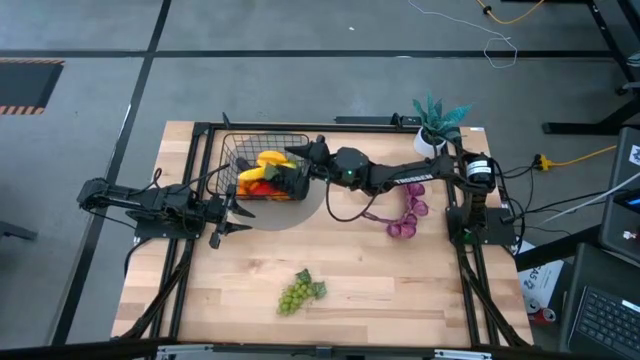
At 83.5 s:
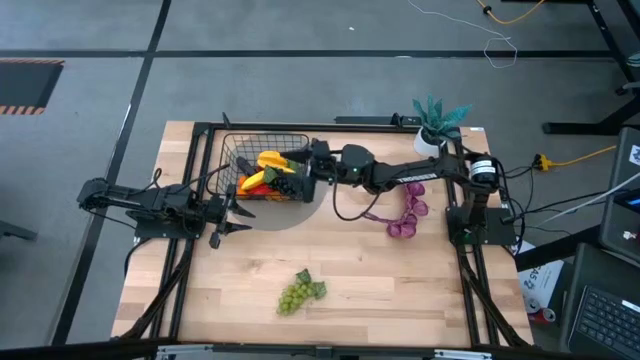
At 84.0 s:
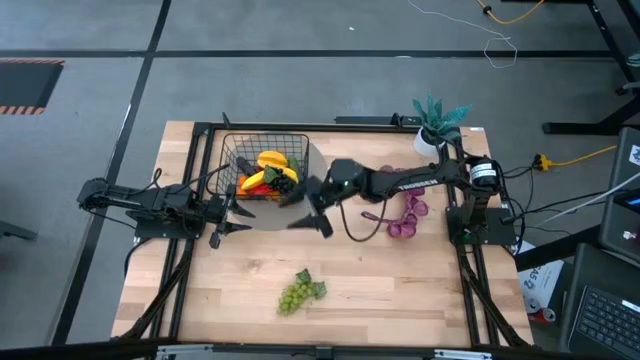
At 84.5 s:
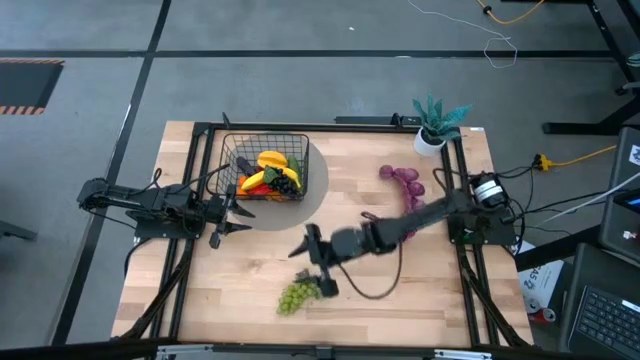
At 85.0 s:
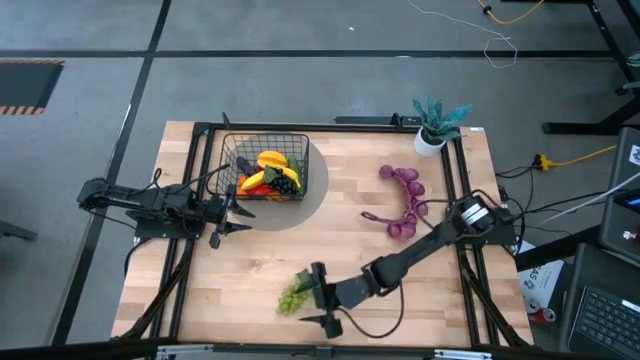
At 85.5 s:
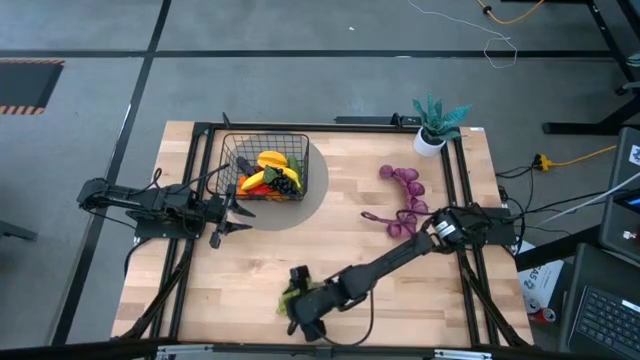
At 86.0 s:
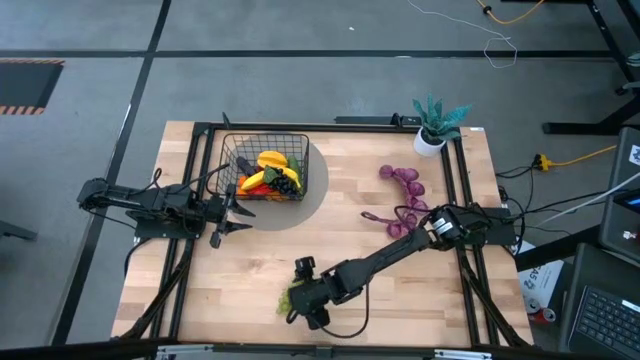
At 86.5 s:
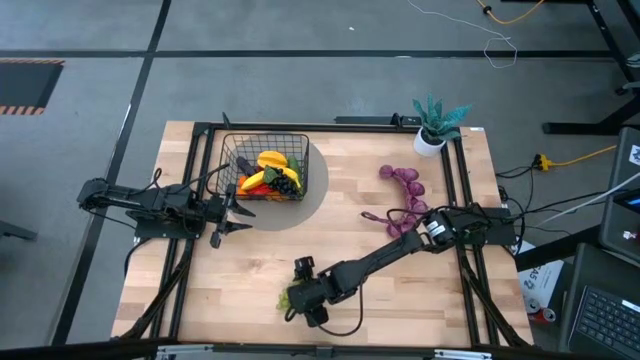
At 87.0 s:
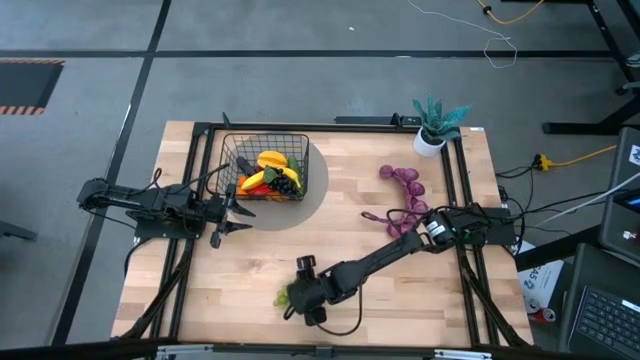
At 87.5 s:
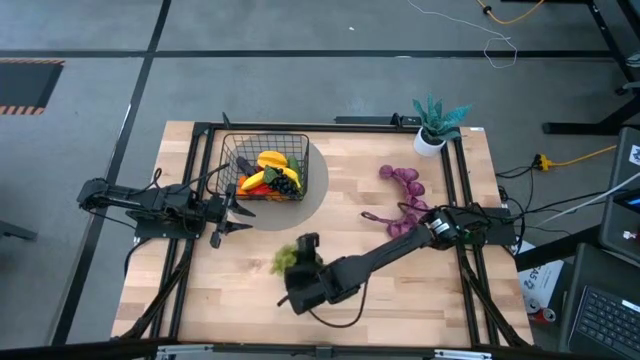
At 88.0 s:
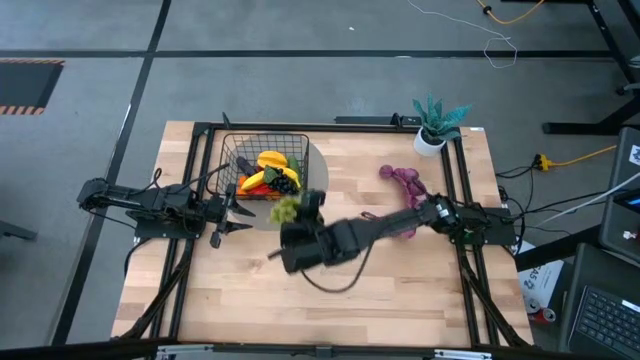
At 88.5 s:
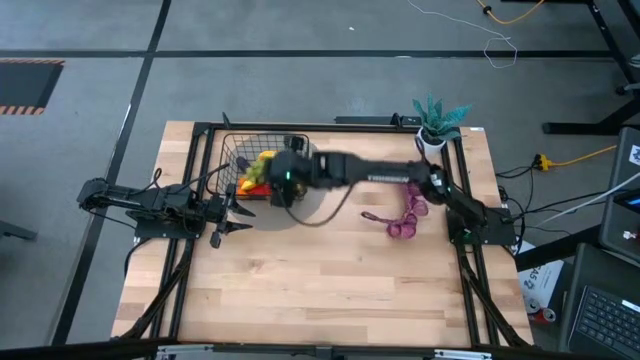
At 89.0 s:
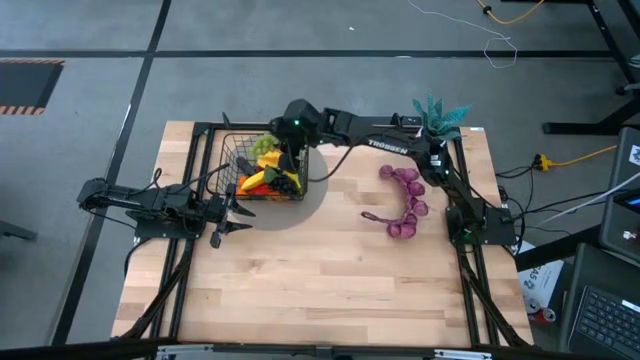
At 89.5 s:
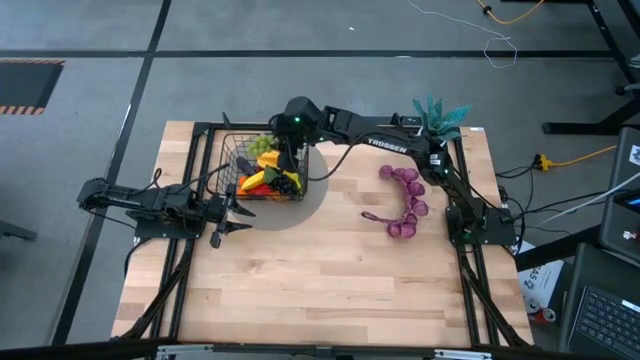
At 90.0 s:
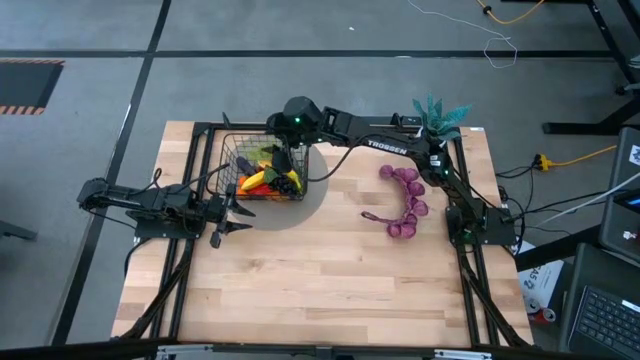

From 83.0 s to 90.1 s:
Task: Build produce basket
Put the green grapes into the wire basket

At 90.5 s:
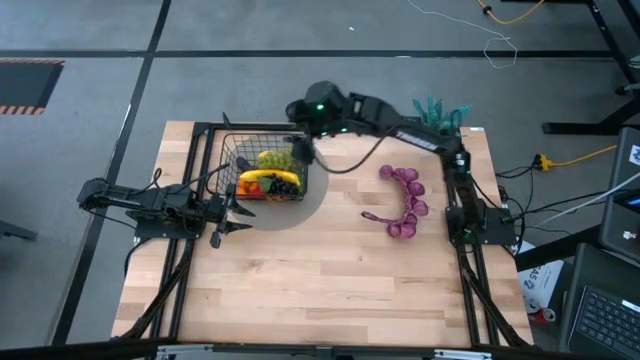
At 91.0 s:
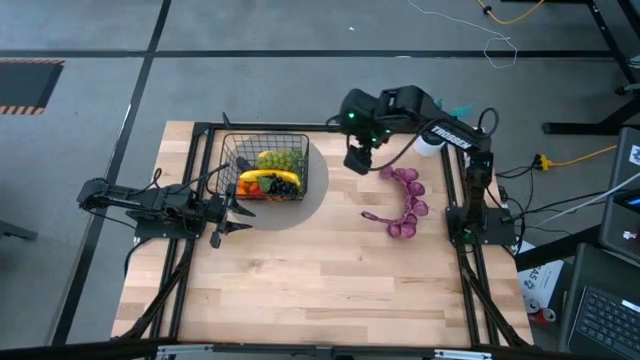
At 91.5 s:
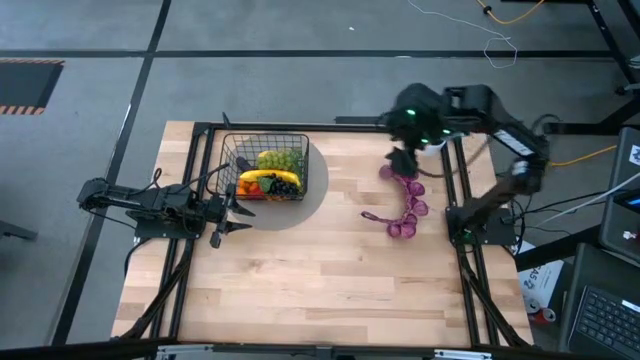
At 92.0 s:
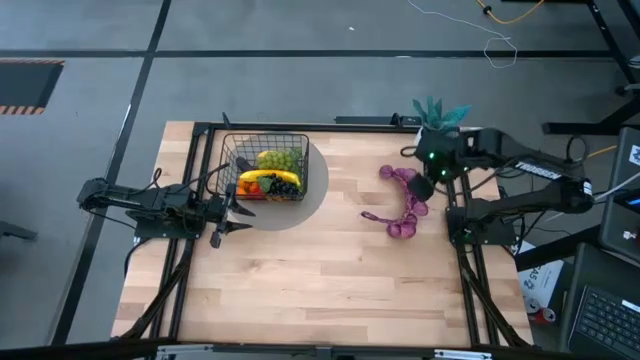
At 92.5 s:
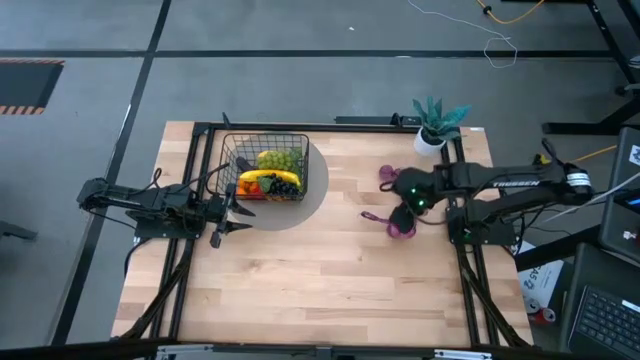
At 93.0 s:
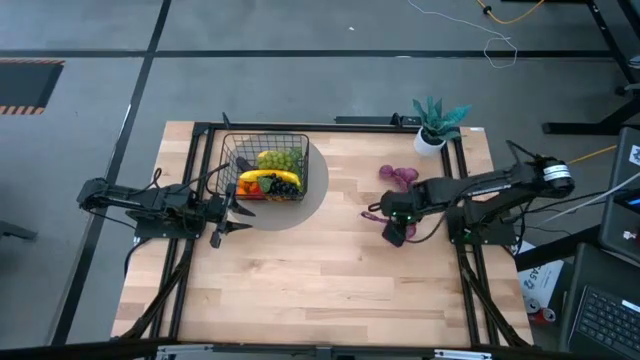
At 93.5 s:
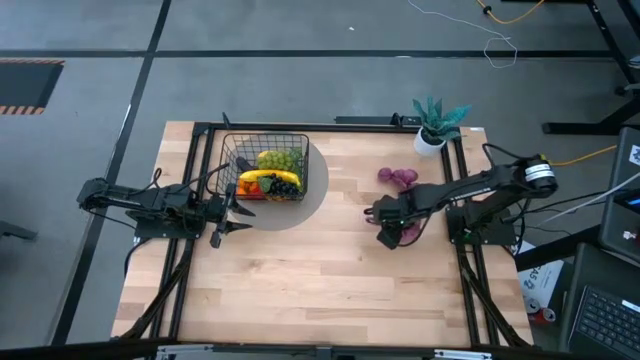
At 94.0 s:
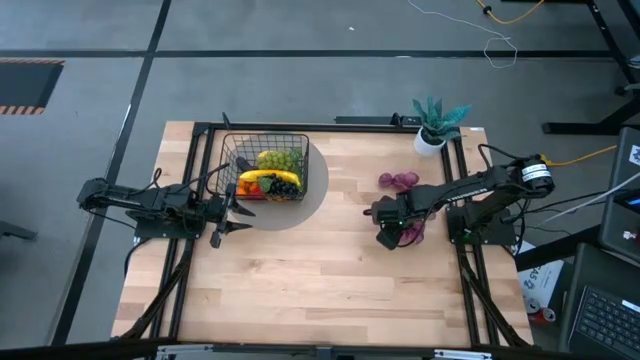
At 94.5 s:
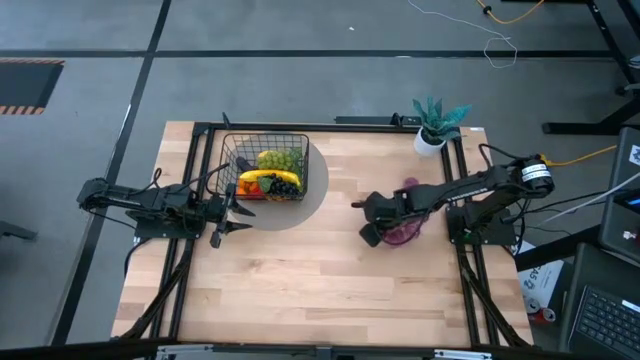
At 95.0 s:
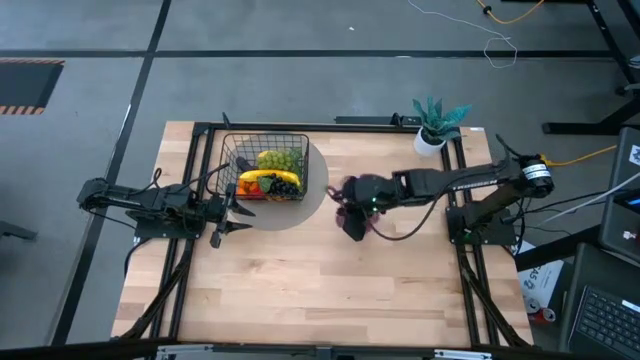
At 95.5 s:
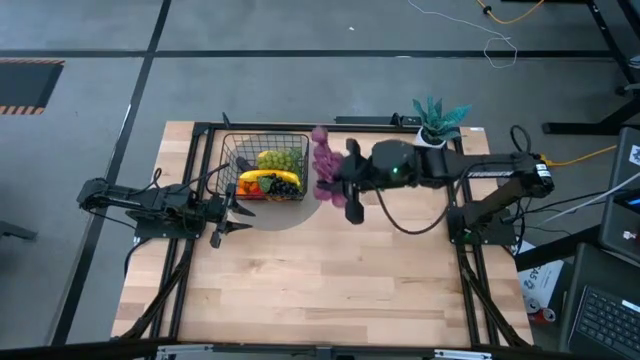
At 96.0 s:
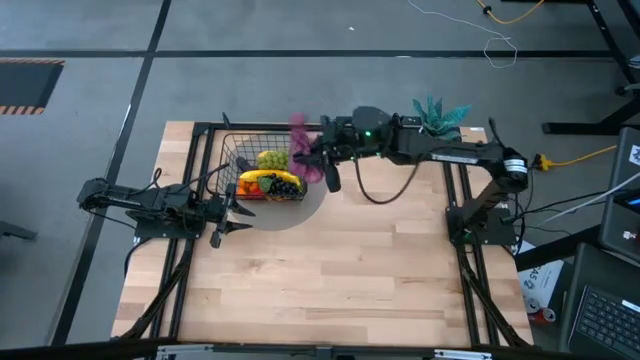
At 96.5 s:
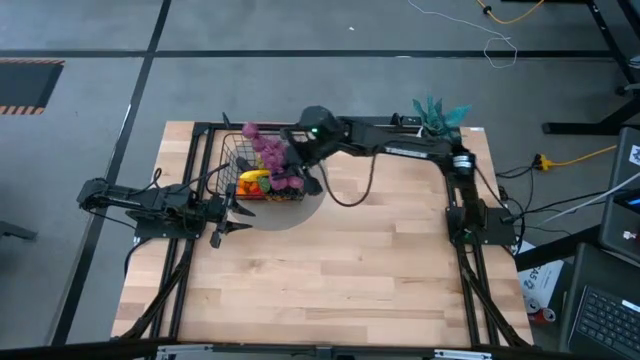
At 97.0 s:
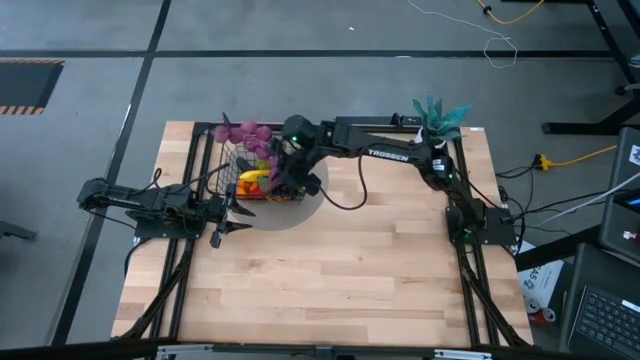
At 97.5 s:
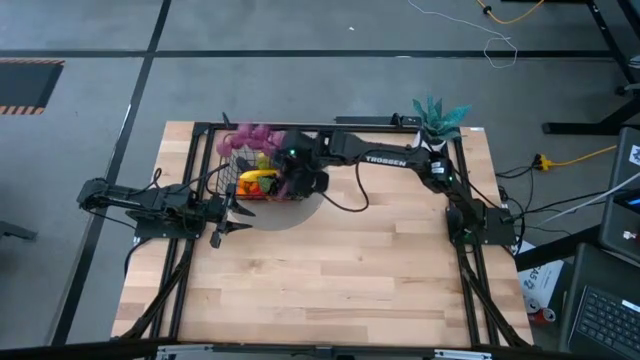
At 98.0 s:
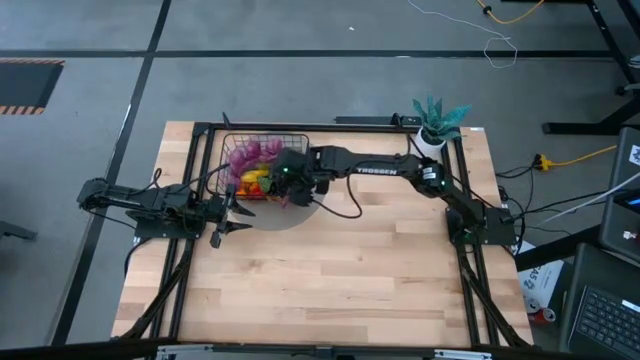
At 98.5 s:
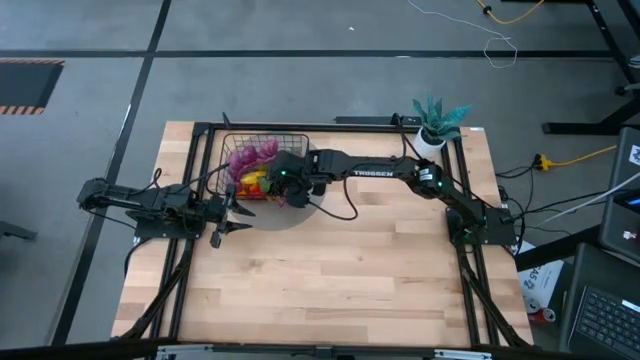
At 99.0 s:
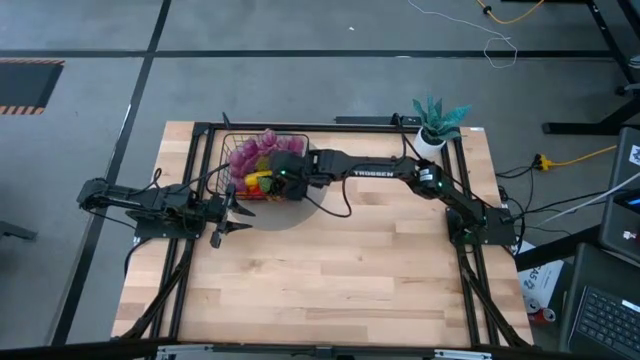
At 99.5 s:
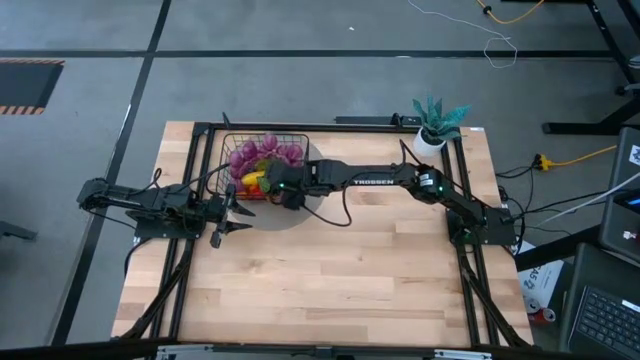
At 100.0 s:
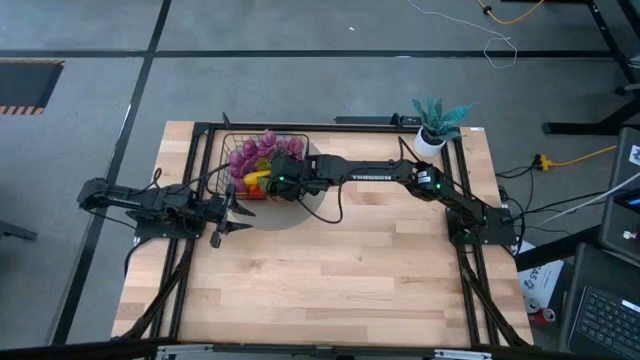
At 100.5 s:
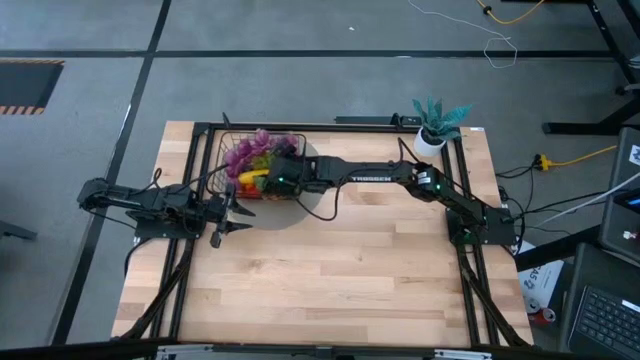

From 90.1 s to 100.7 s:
Put the violet garlic into the wire basket

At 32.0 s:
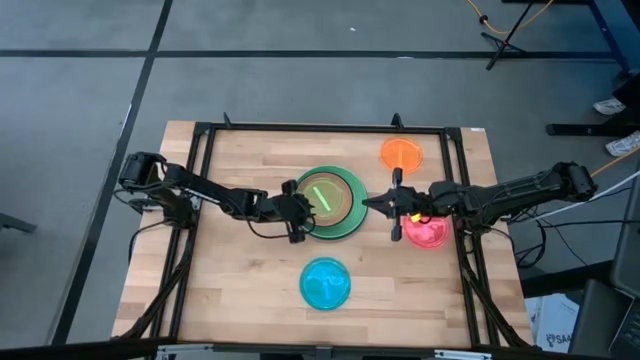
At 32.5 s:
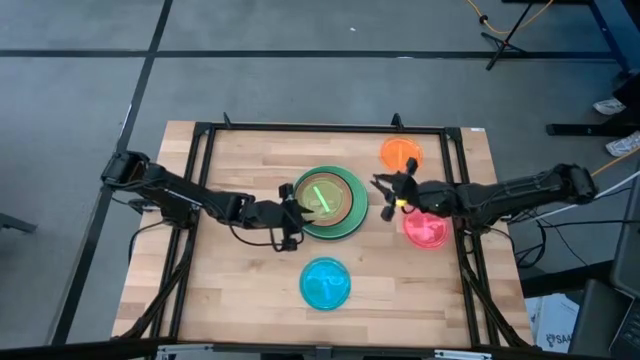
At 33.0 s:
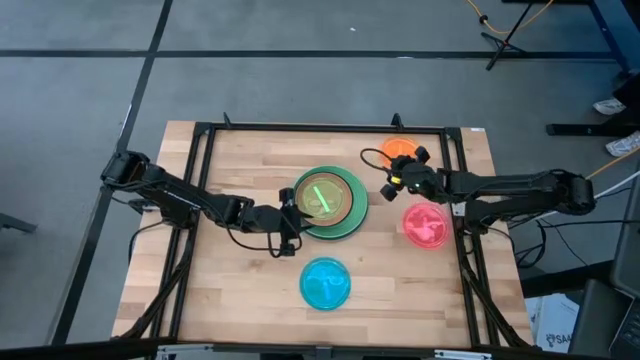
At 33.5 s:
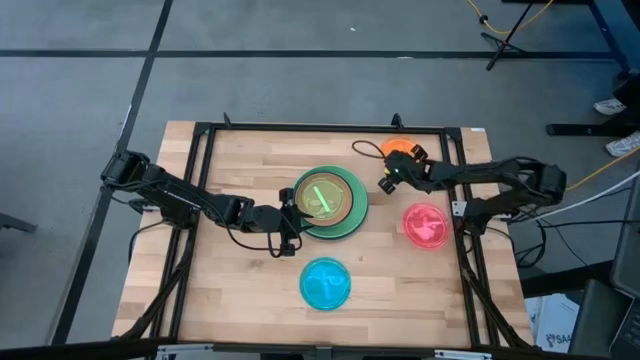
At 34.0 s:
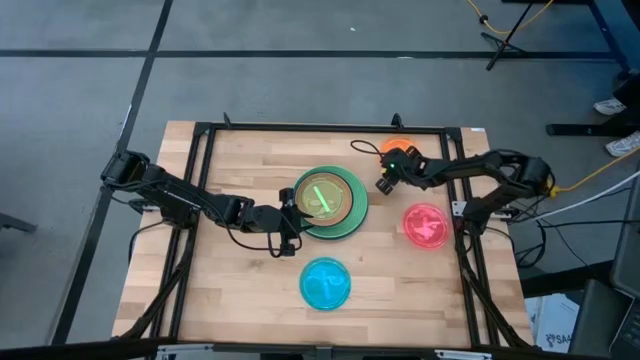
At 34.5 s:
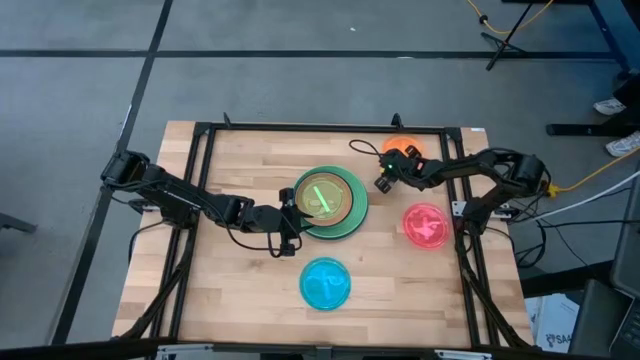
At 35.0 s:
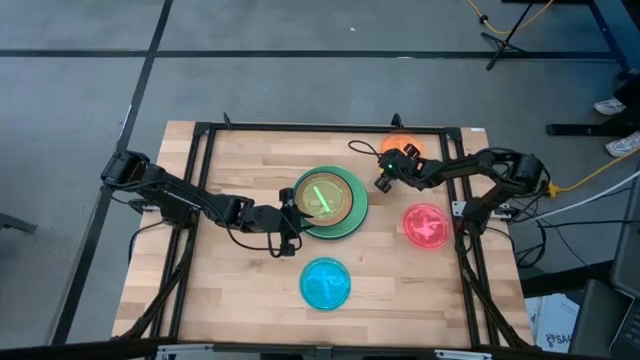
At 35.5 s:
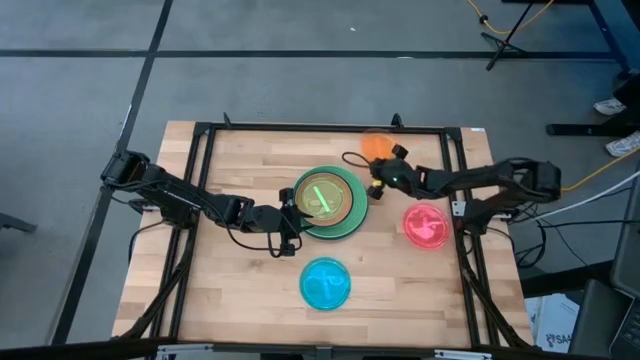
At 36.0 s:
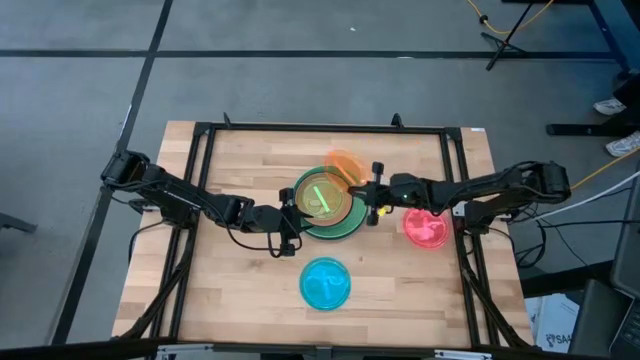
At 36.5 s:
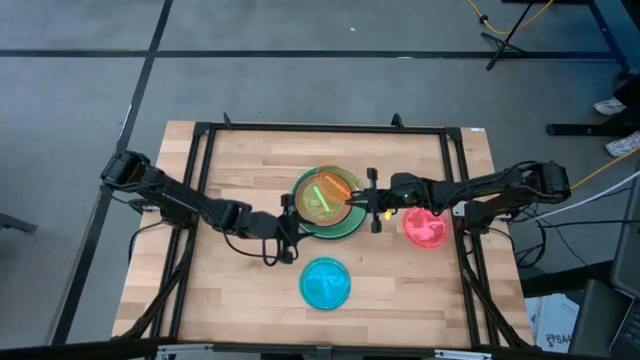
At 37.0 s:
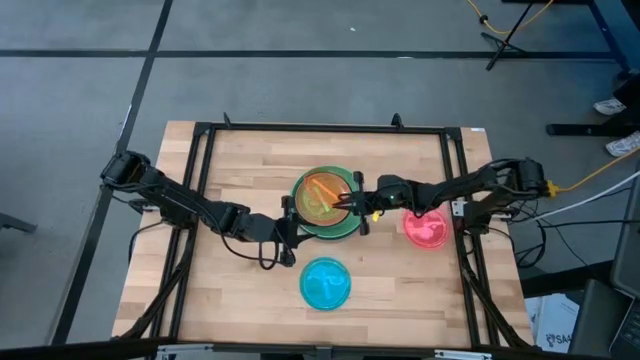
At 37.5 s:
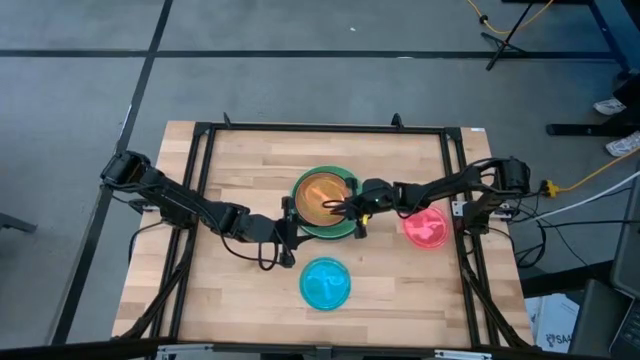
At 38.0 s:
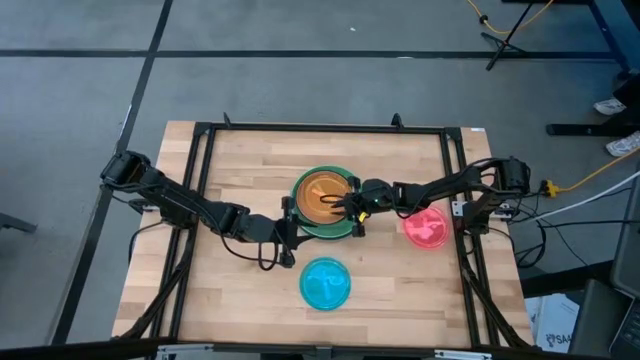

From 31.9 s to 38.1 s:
Task: Stack plastic plates
Stack the light orange plate on top of the light green plate
